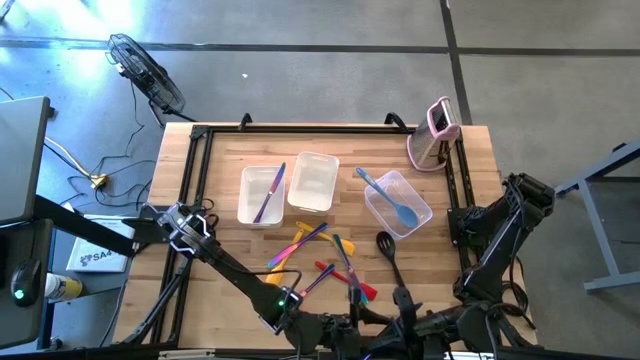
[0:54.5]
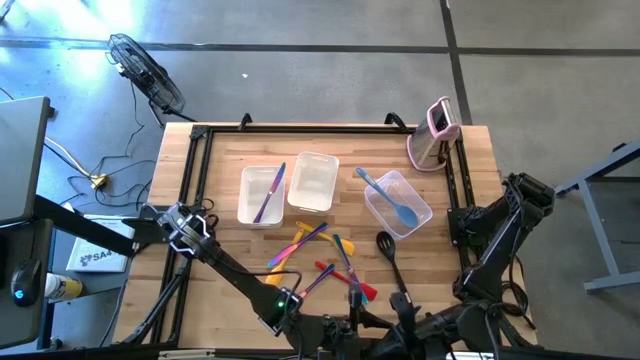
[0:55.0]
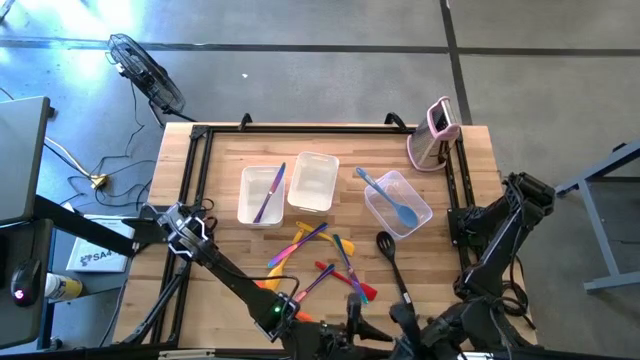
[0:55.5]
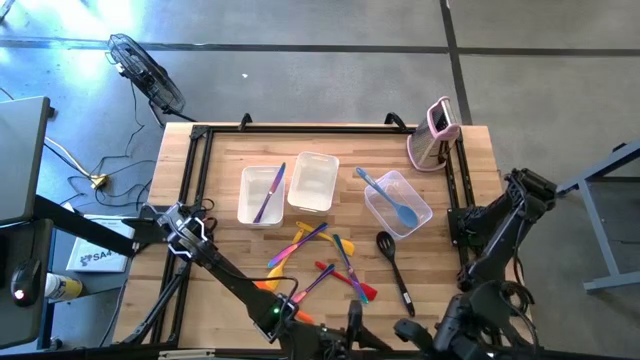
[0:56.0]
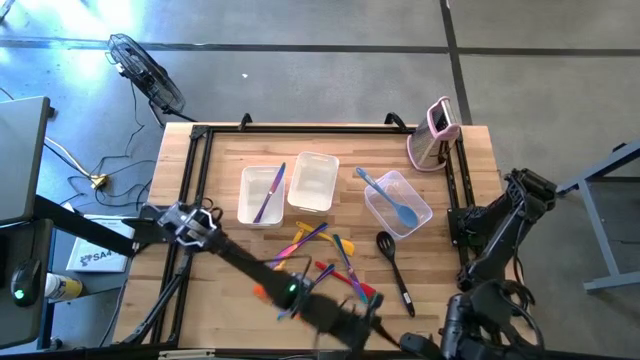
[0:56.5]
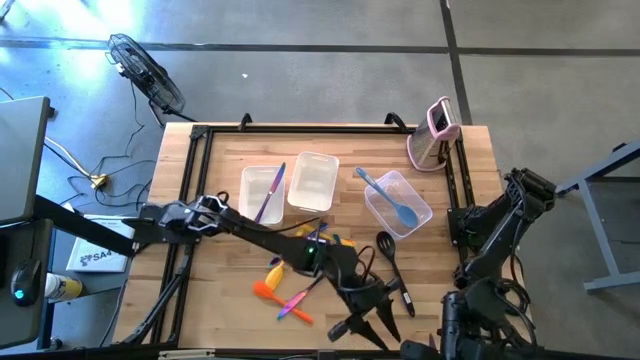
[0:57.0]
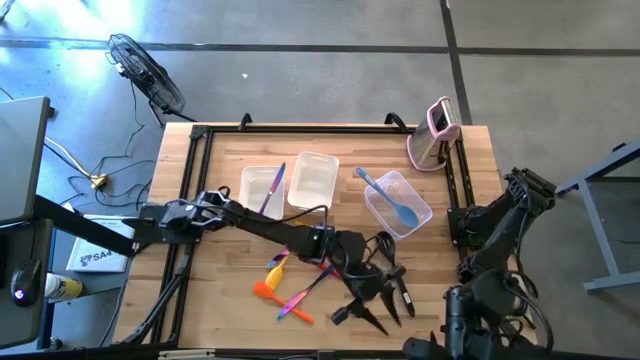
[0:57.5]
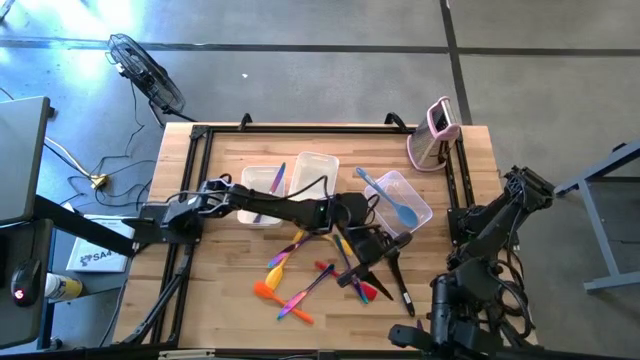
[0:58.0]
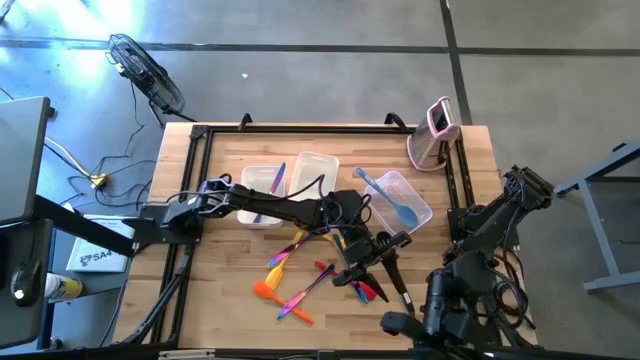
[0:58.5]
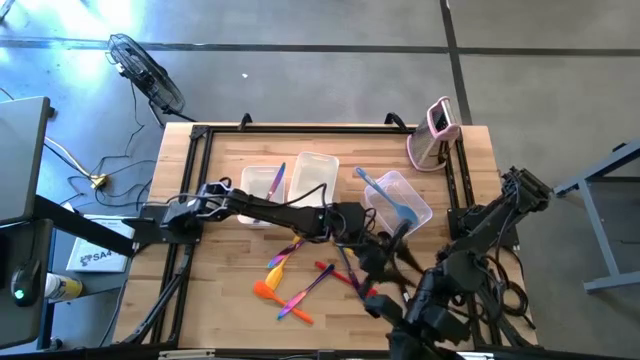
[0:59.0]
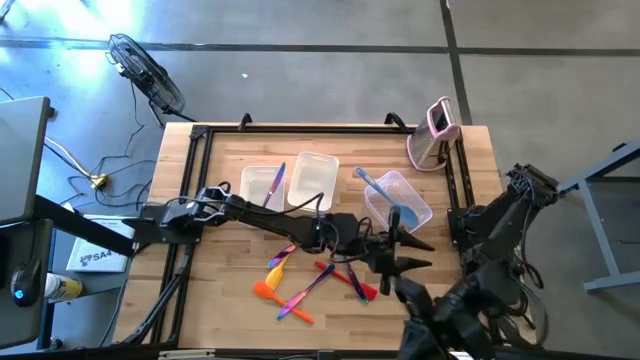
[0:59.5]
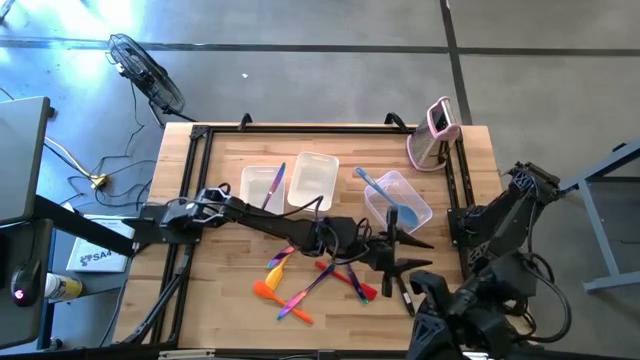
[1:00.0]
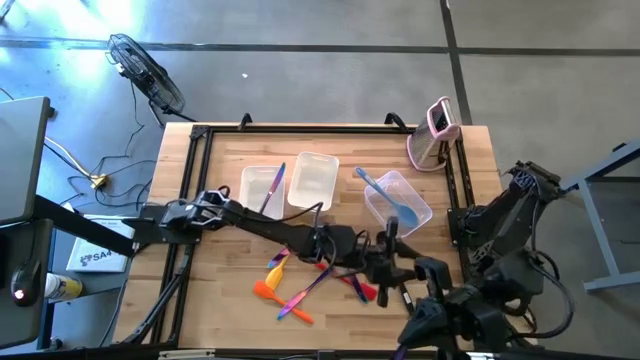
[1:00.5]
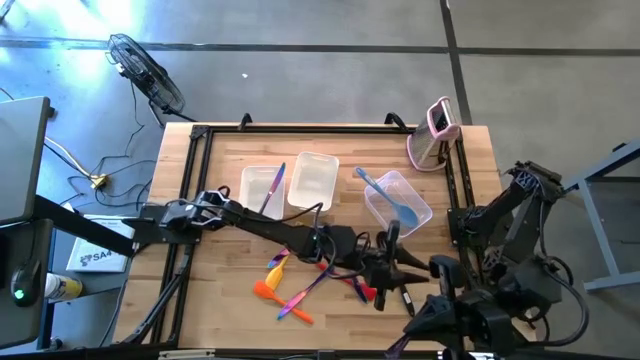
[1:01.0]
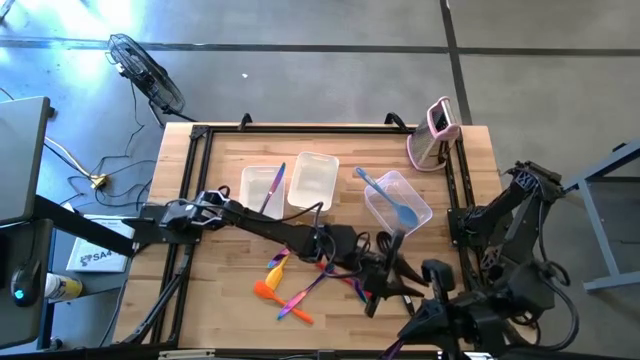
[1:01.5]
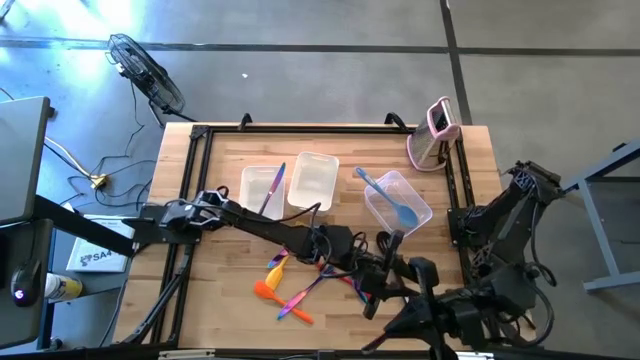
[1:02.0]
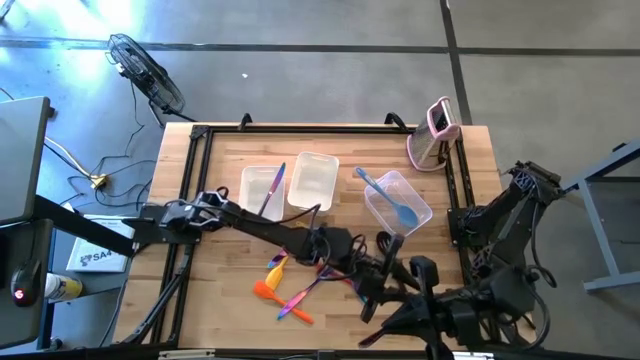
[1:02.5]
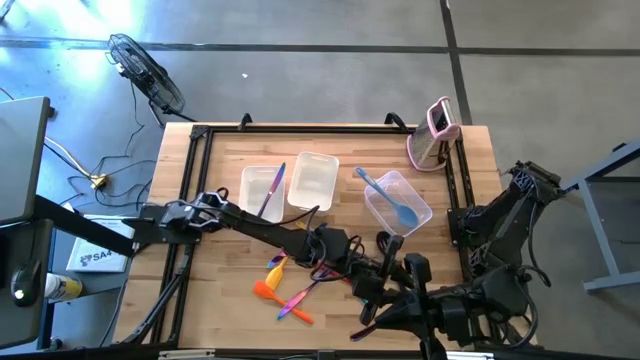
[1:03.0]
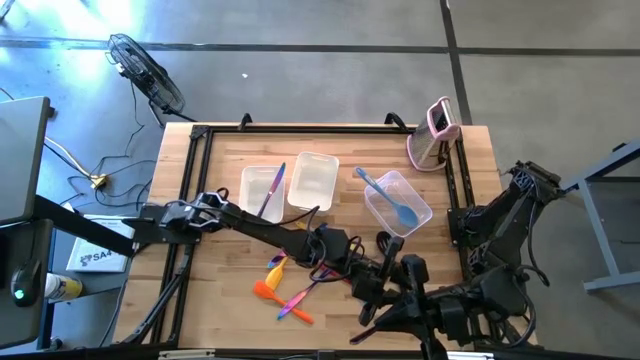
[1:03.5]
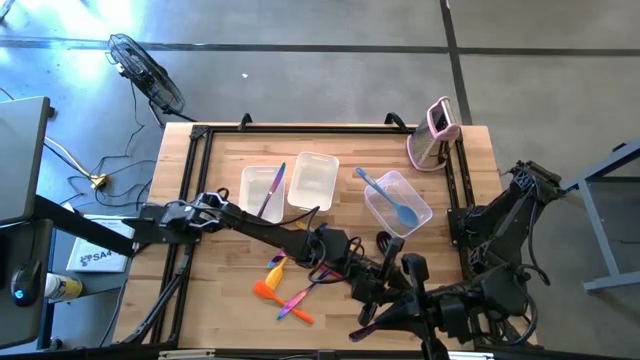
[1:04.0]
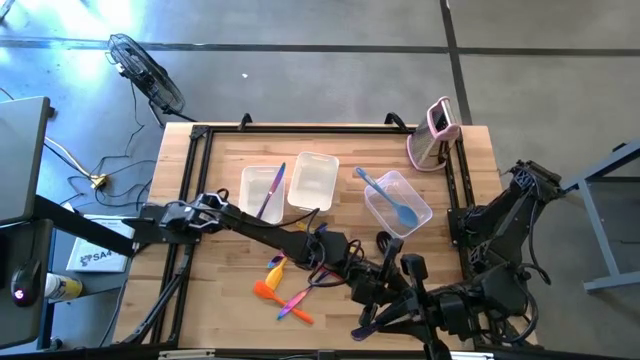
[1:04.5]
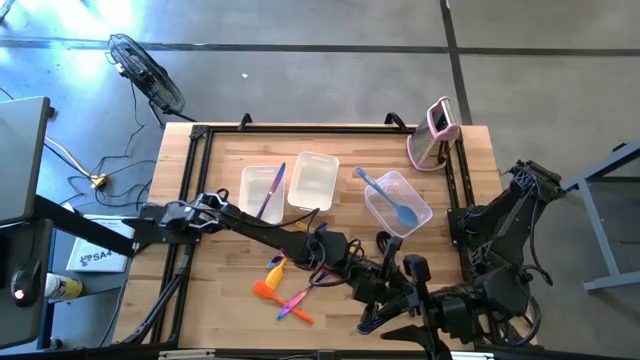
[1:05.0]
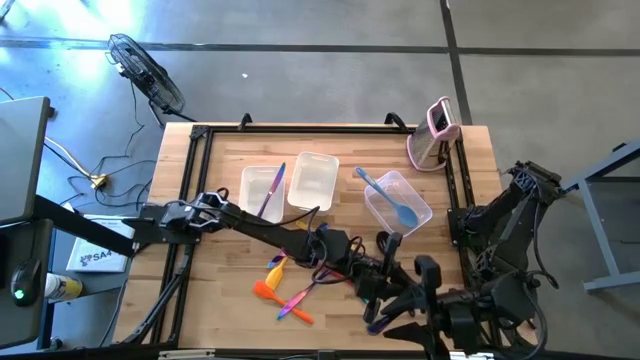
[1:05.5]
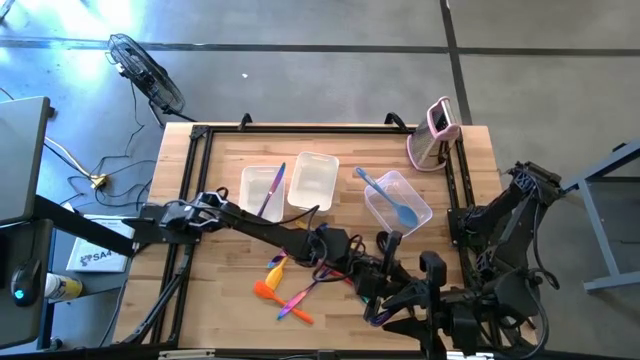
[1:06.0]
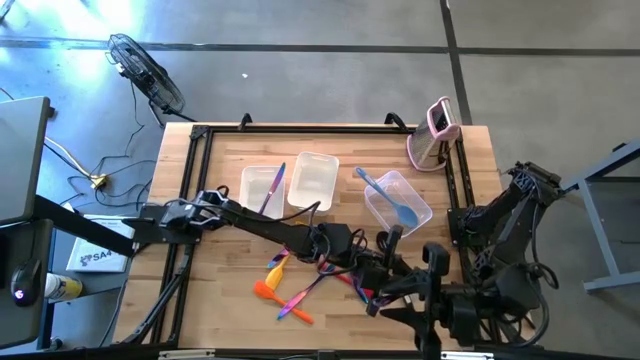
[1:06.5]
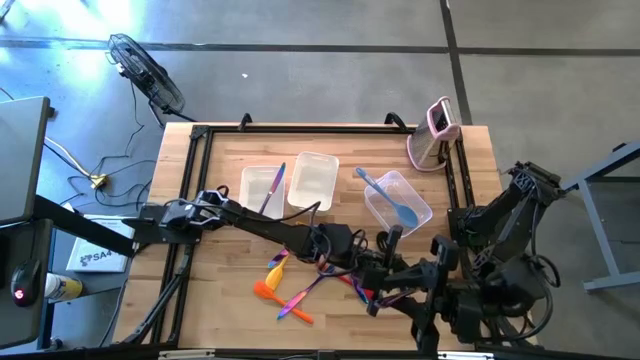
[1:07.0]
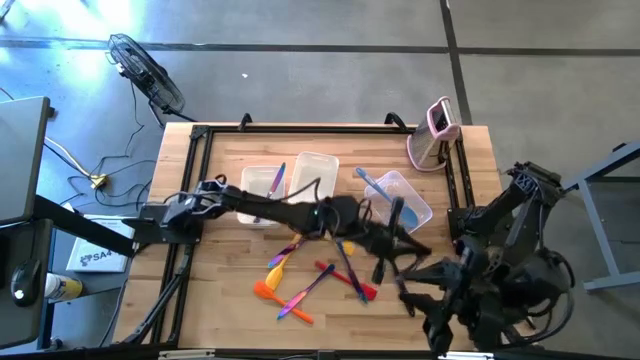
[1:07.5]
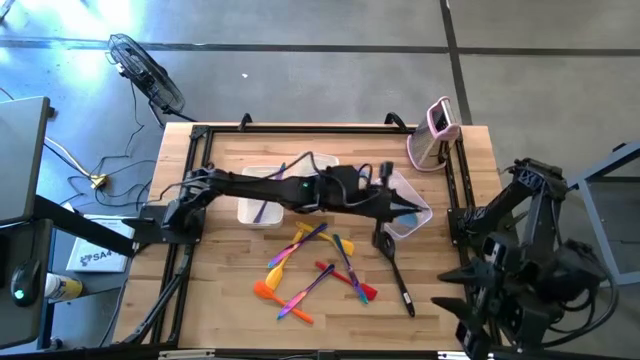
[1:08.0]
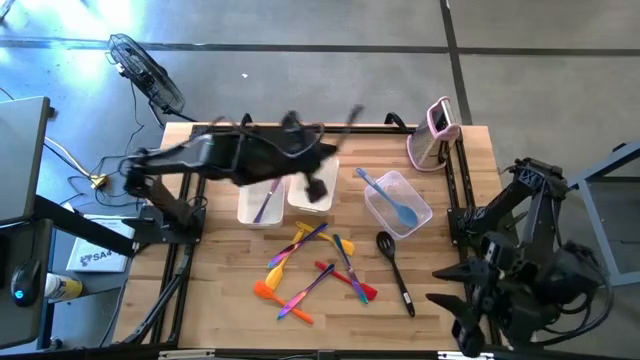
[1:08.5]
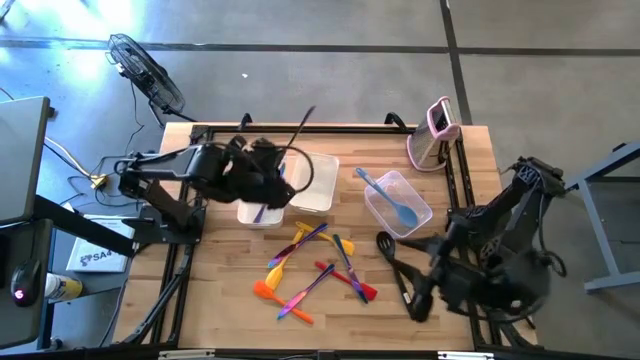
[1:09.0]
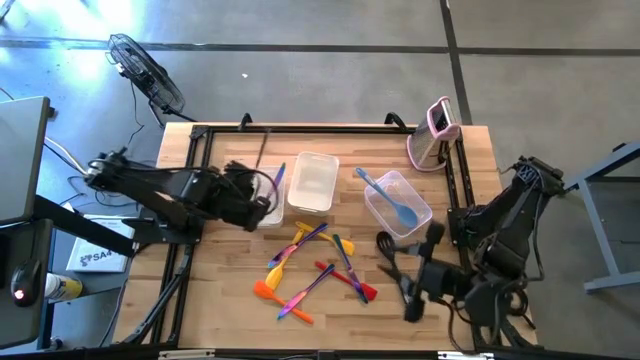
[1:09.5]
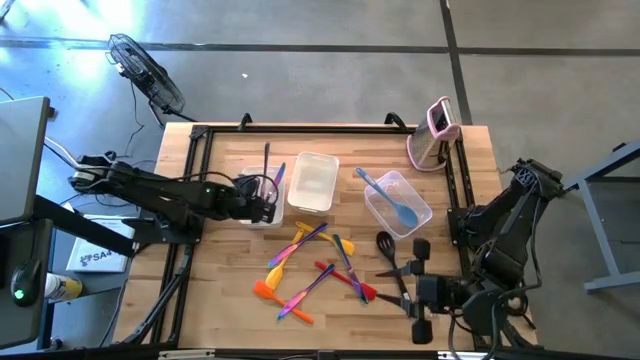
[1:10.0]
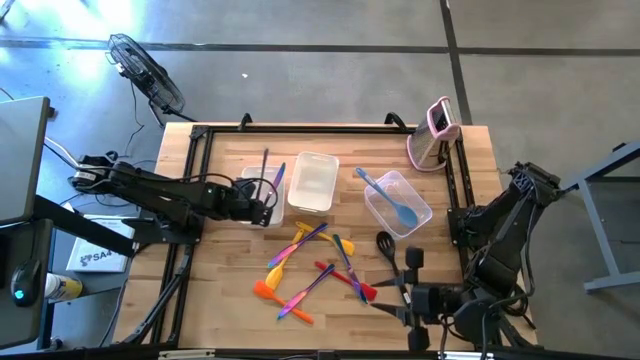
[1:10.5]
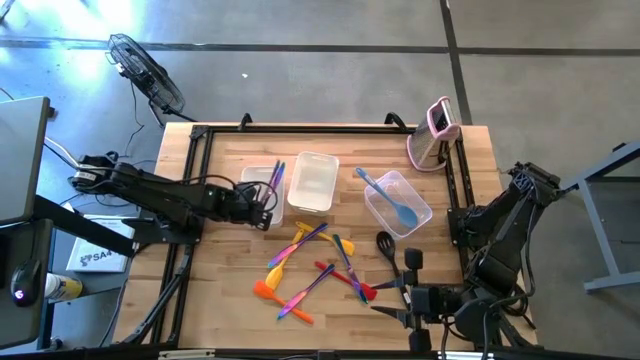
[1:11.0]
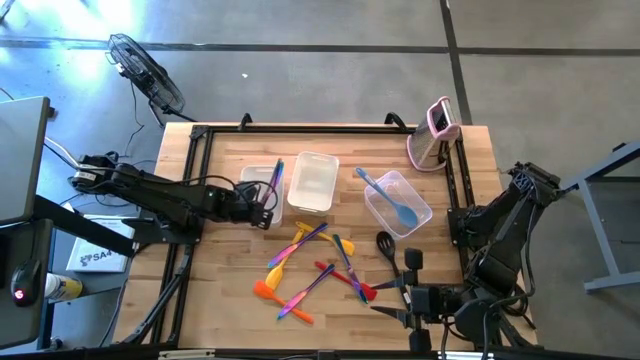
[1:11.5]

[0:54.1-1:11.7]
Task: Pick & Place Kitchen Items
Put the blue table knife into the left white bin

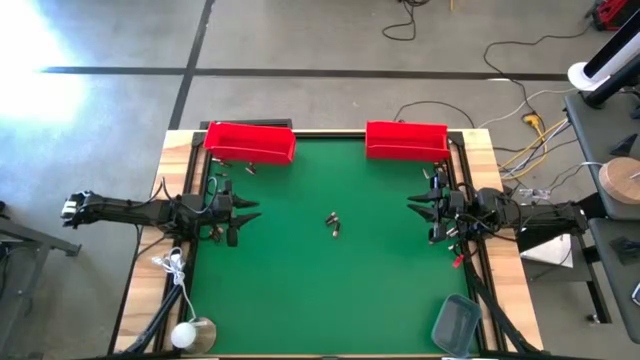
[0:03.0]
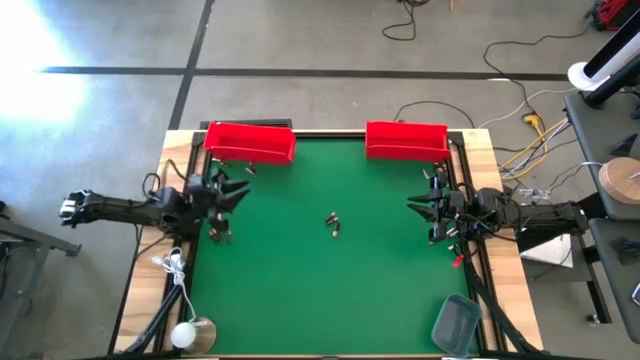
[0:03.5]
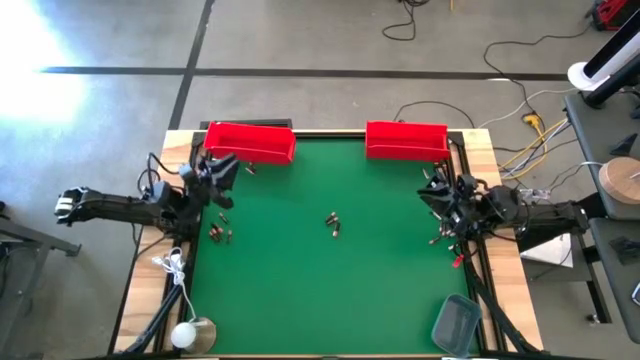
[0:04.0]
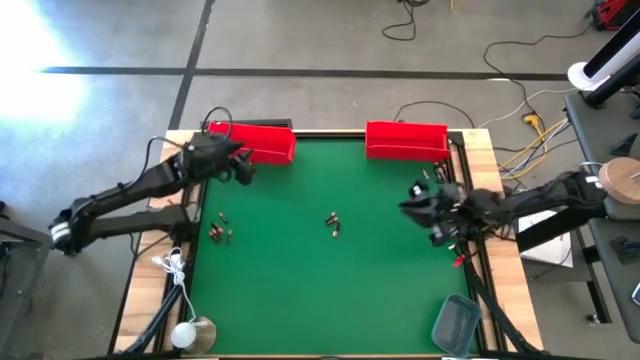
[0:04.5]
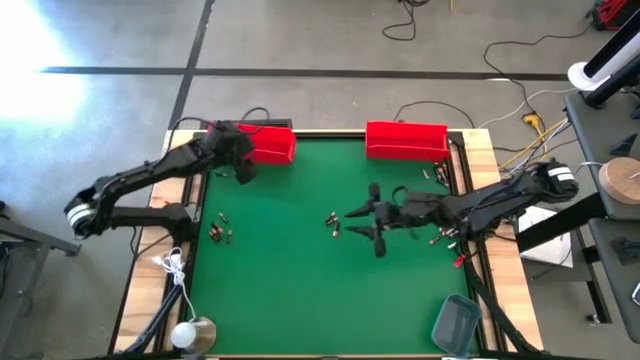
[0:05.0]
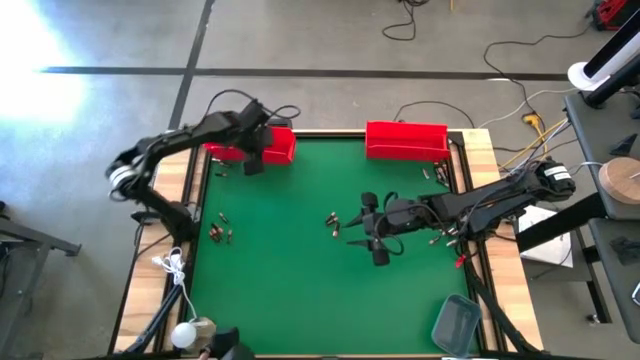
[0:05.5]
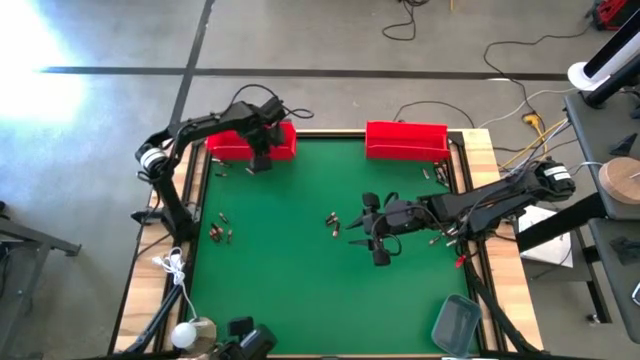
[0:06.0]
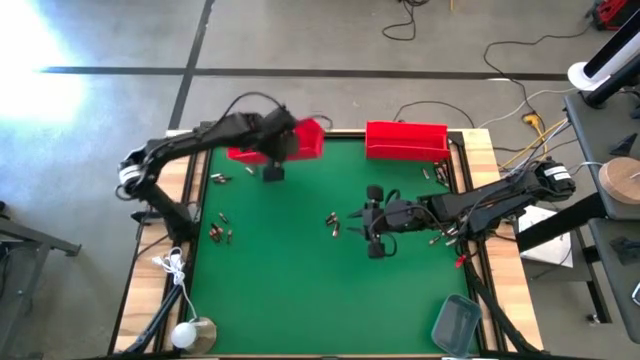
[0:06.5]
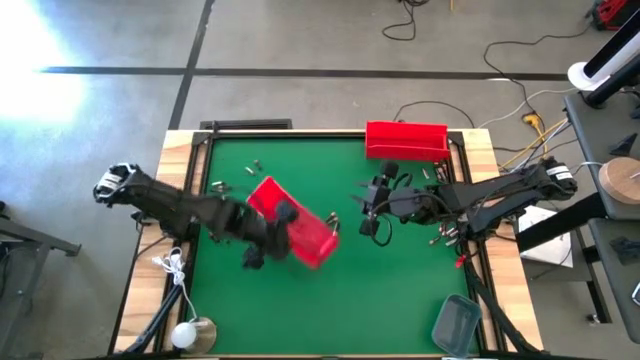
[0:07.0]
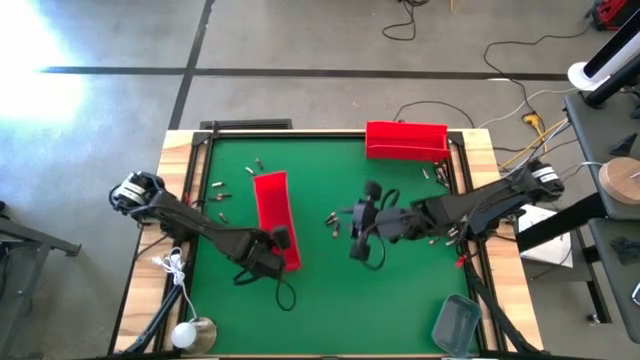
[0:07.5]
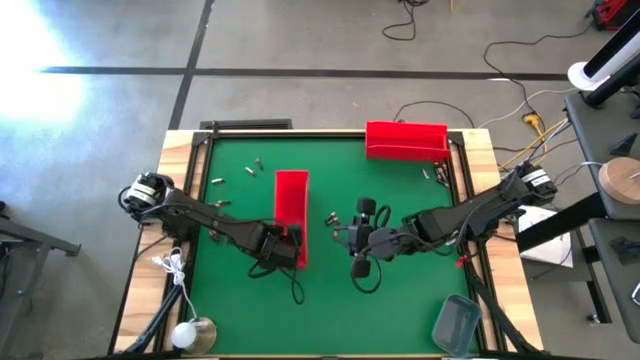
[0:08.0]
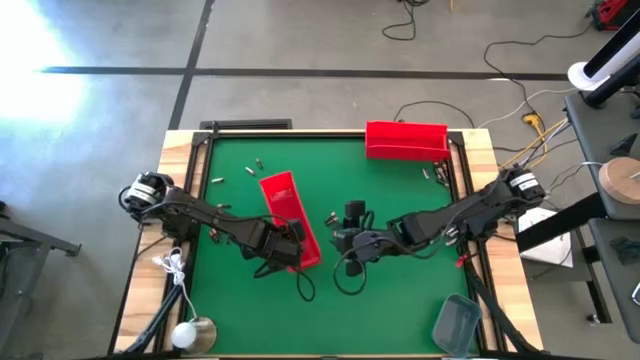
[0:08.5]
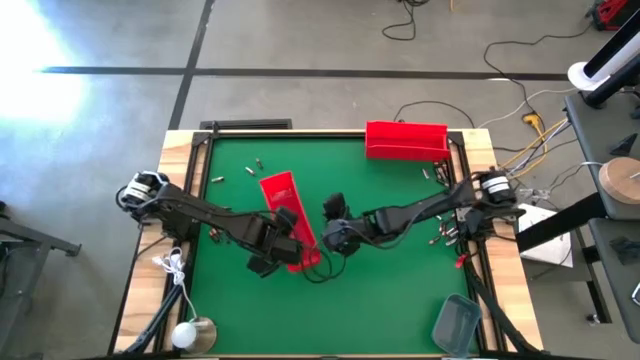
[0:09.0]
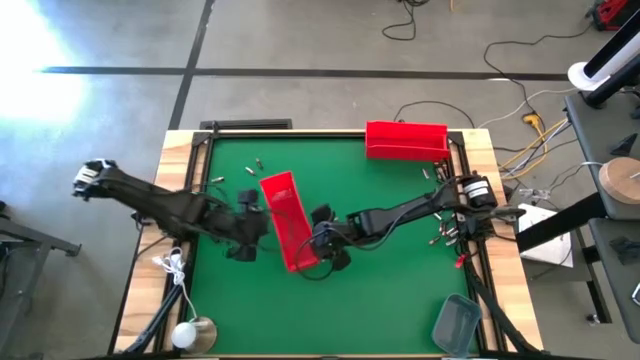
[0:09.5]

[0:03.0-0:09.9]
Task: Sort batteries
Move the left red bin to the middle of the table
